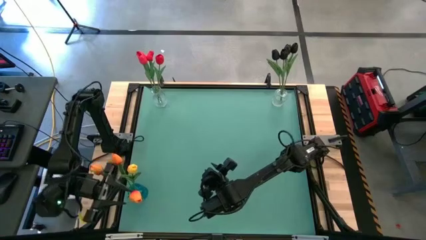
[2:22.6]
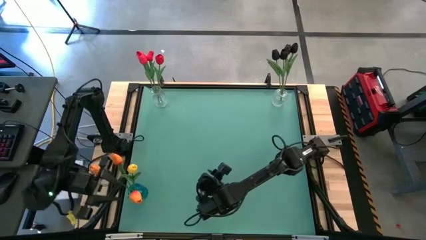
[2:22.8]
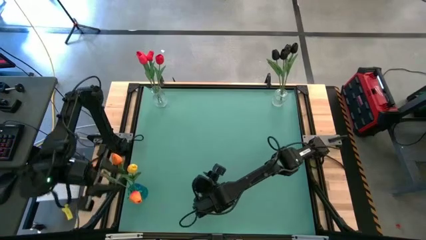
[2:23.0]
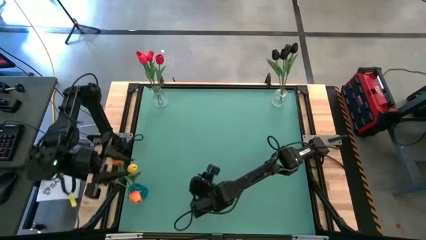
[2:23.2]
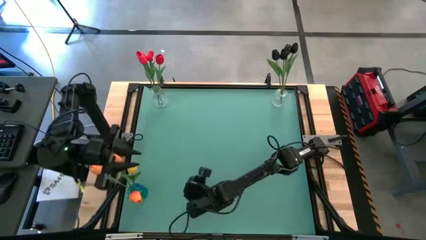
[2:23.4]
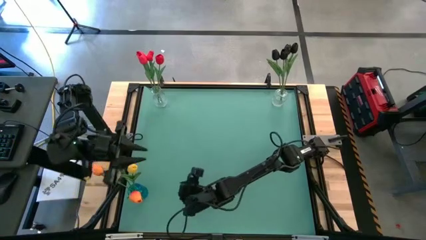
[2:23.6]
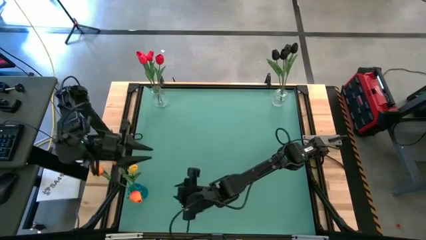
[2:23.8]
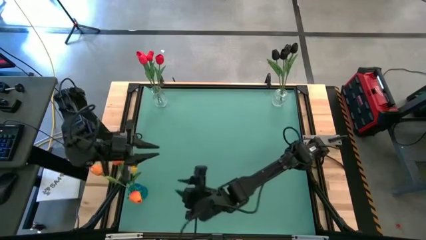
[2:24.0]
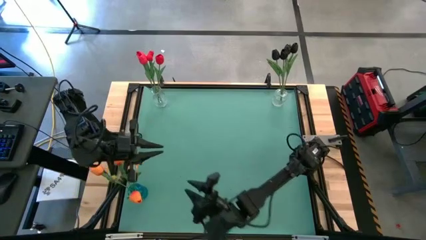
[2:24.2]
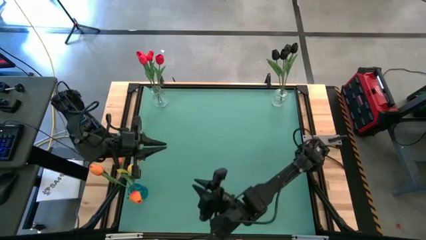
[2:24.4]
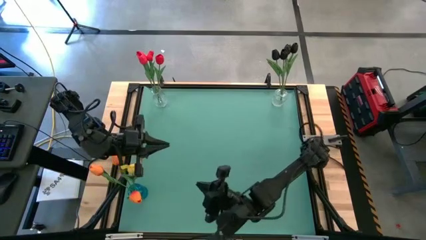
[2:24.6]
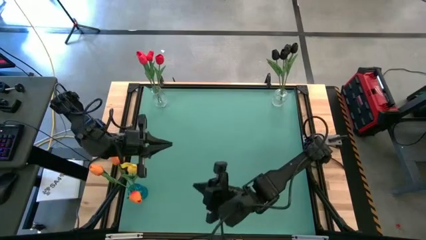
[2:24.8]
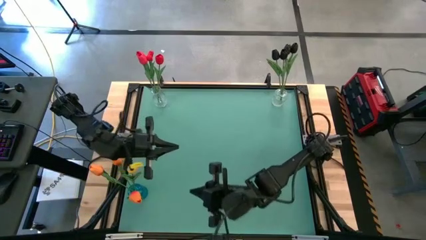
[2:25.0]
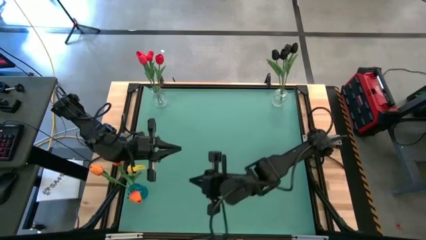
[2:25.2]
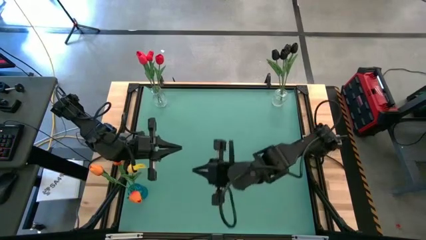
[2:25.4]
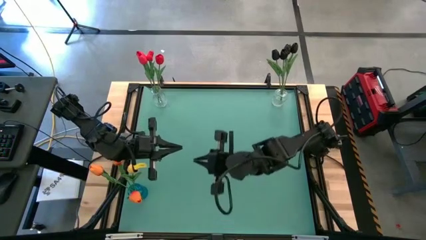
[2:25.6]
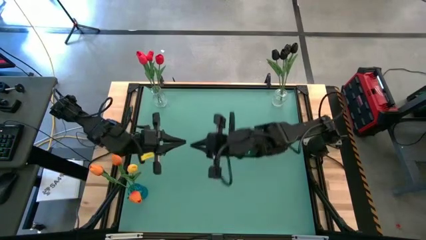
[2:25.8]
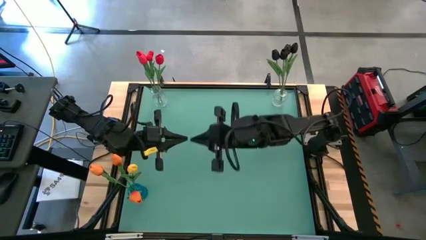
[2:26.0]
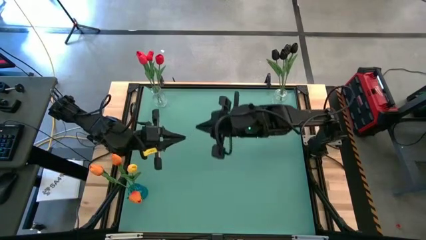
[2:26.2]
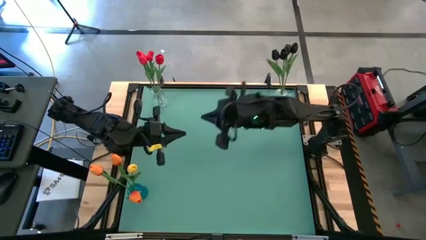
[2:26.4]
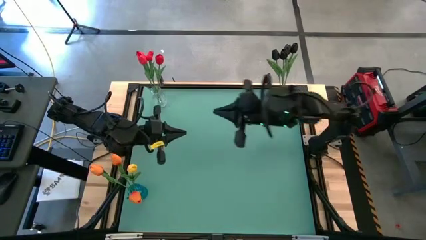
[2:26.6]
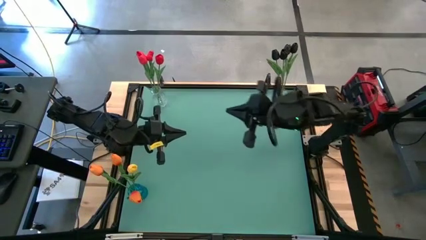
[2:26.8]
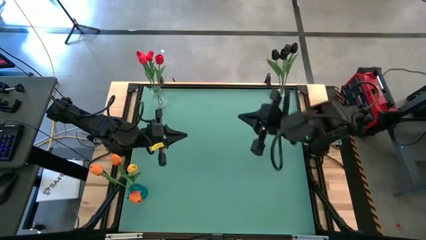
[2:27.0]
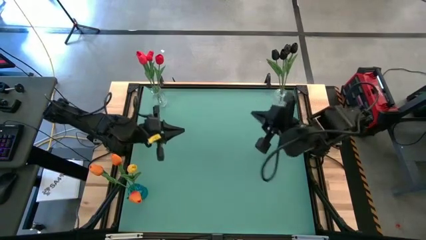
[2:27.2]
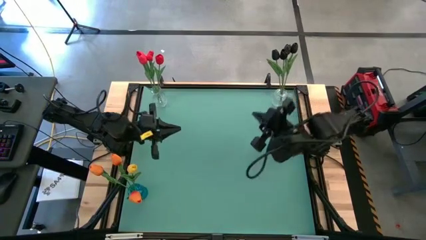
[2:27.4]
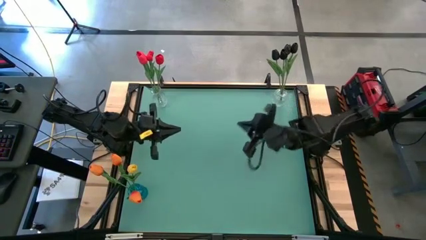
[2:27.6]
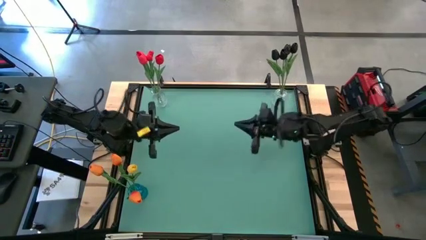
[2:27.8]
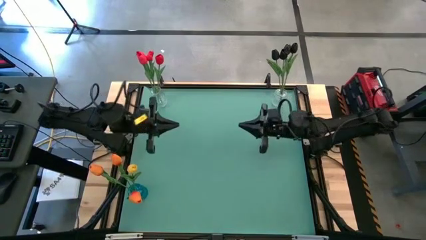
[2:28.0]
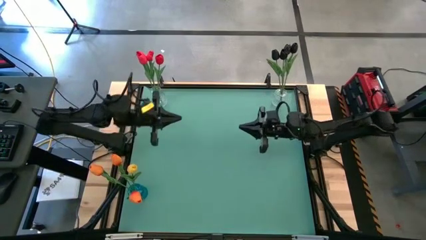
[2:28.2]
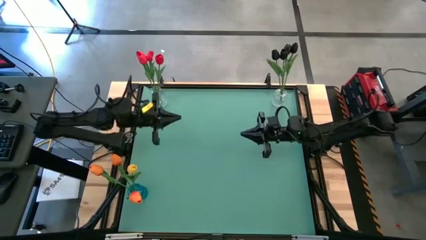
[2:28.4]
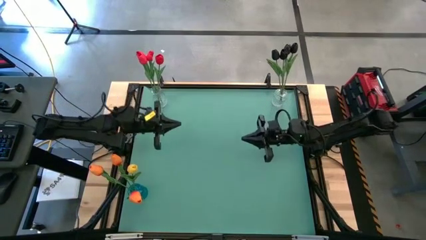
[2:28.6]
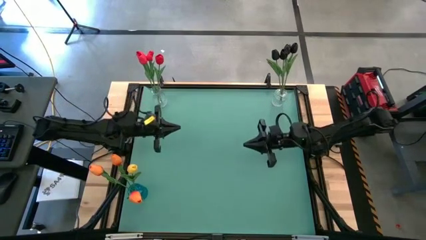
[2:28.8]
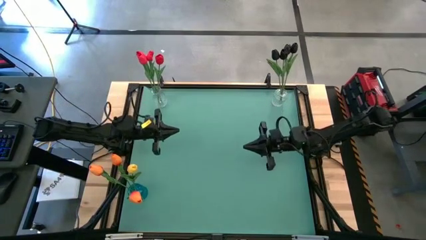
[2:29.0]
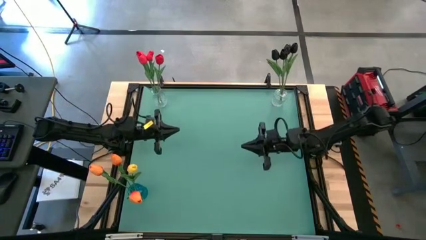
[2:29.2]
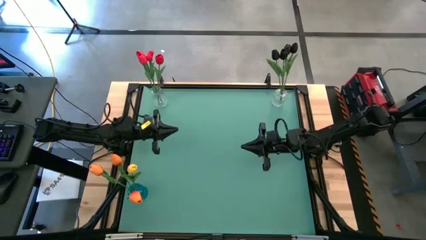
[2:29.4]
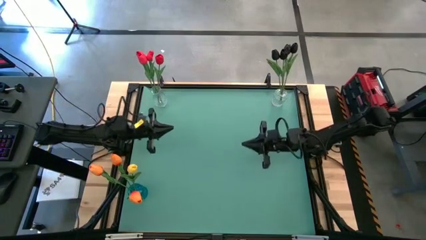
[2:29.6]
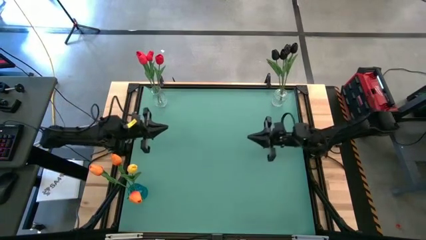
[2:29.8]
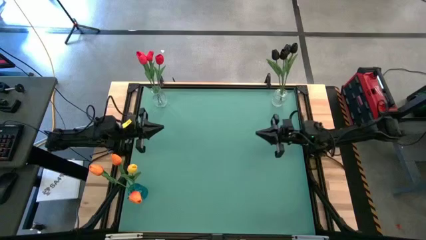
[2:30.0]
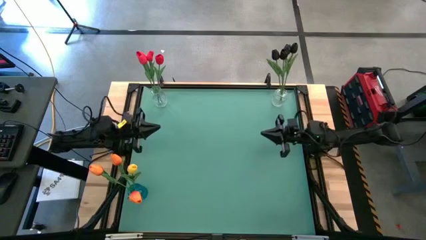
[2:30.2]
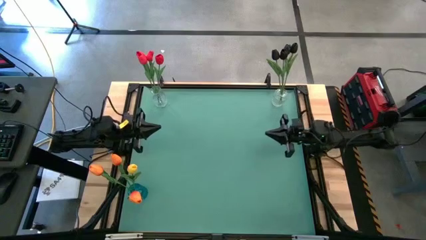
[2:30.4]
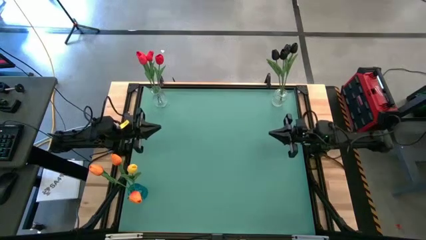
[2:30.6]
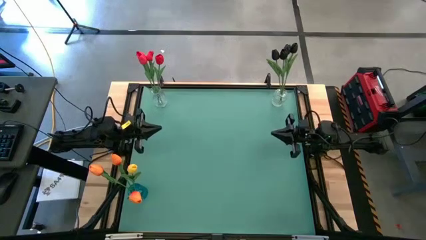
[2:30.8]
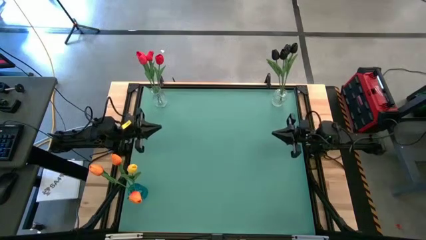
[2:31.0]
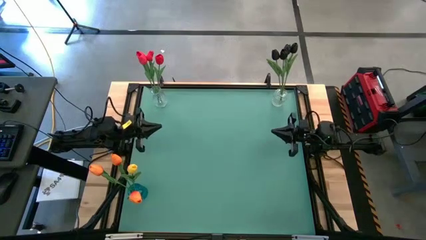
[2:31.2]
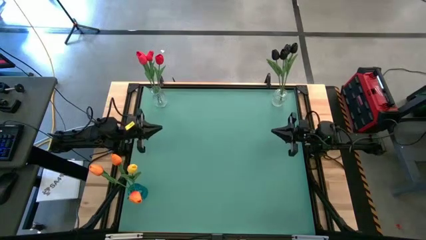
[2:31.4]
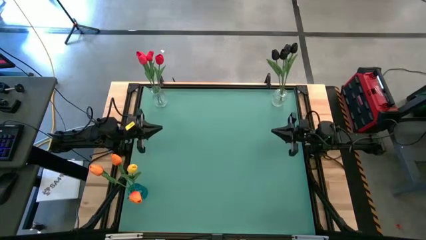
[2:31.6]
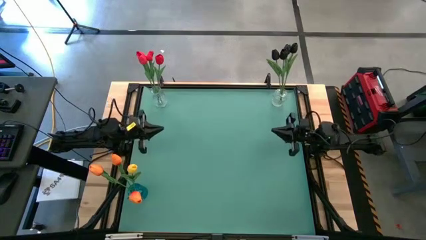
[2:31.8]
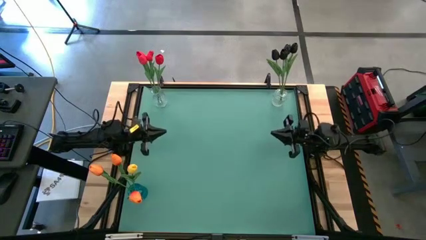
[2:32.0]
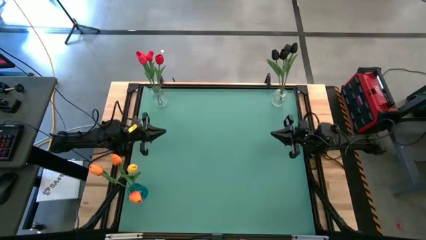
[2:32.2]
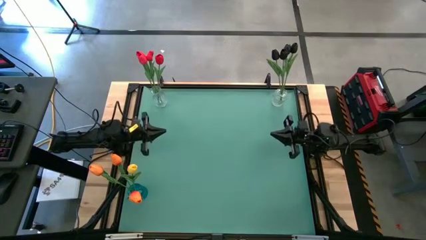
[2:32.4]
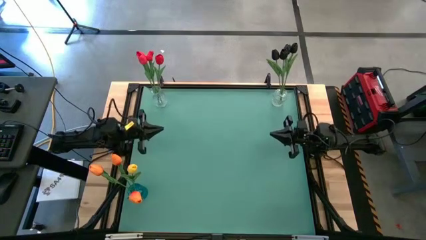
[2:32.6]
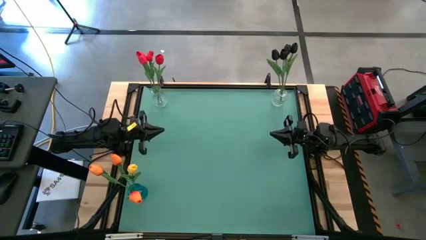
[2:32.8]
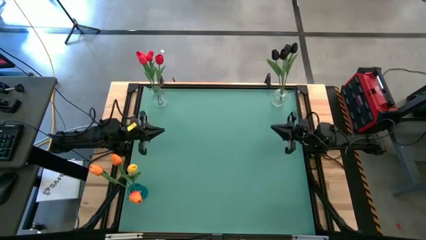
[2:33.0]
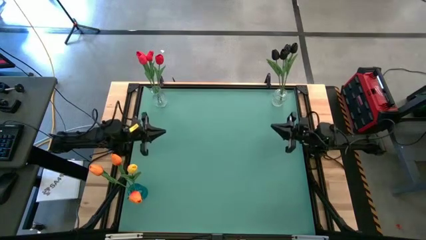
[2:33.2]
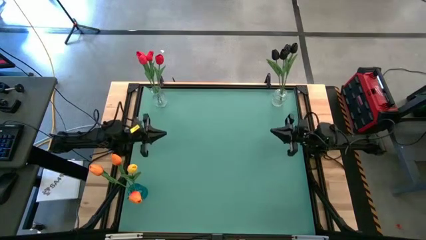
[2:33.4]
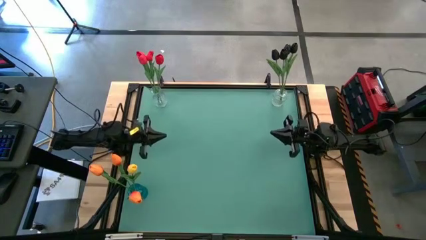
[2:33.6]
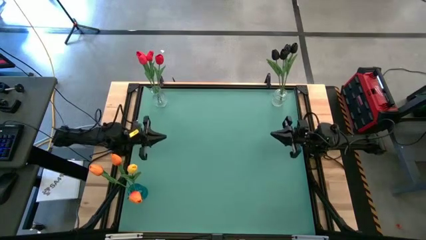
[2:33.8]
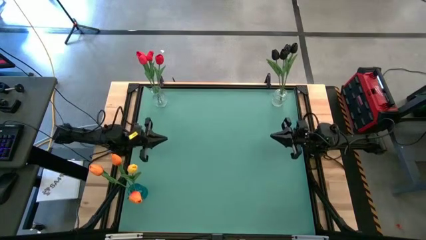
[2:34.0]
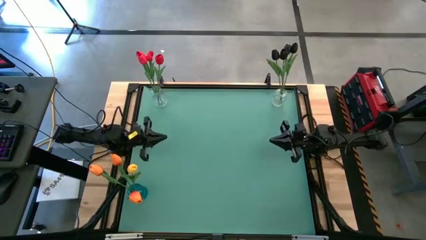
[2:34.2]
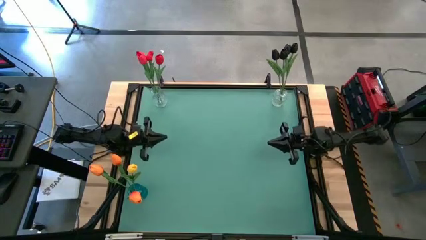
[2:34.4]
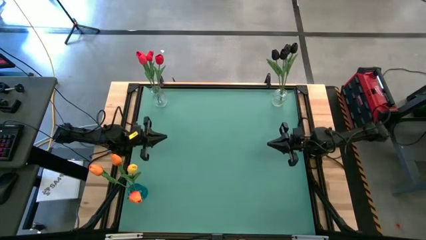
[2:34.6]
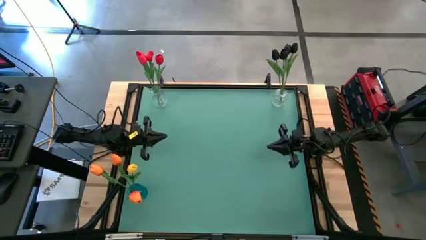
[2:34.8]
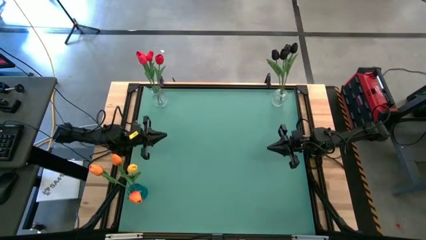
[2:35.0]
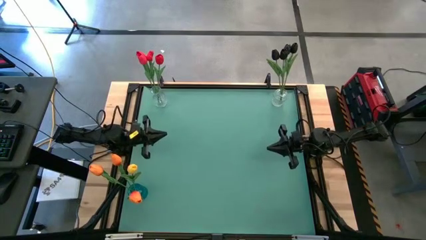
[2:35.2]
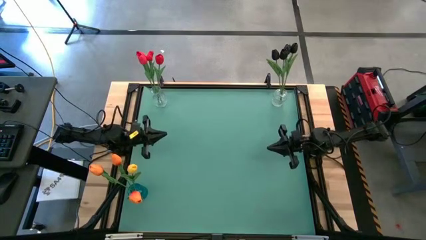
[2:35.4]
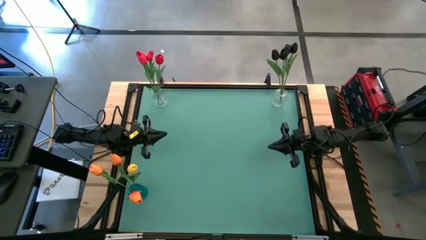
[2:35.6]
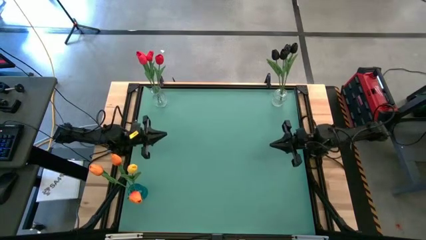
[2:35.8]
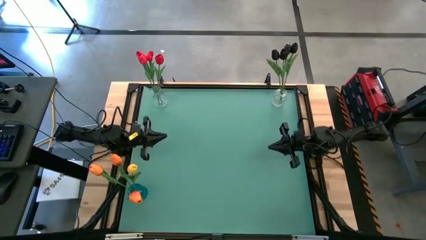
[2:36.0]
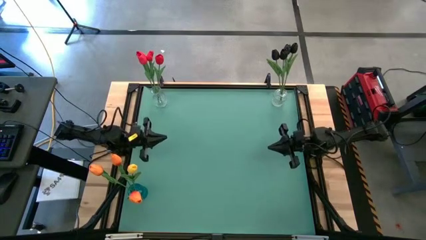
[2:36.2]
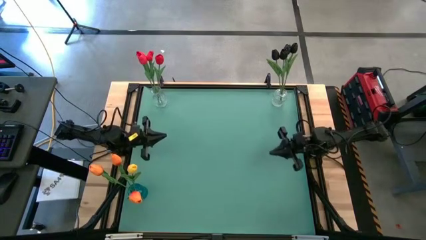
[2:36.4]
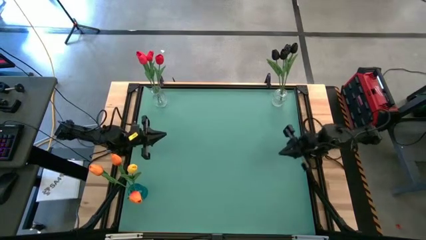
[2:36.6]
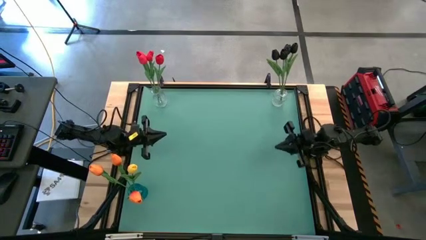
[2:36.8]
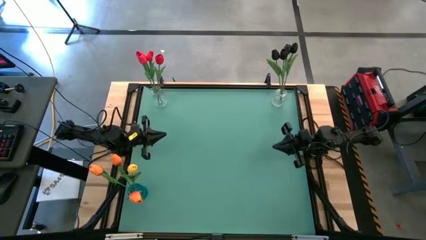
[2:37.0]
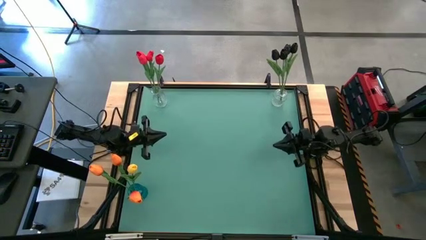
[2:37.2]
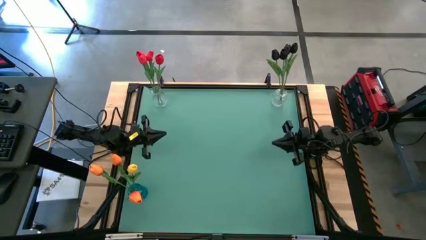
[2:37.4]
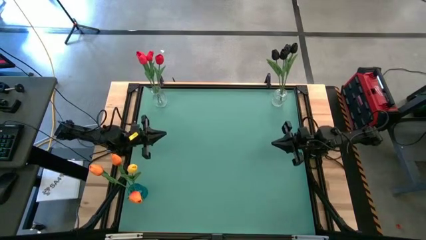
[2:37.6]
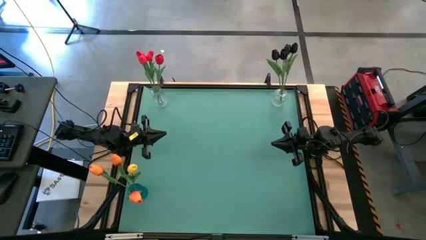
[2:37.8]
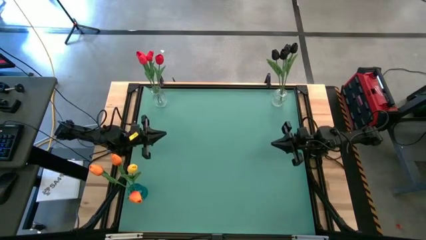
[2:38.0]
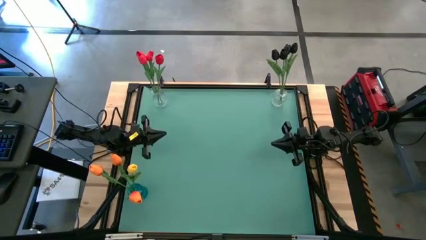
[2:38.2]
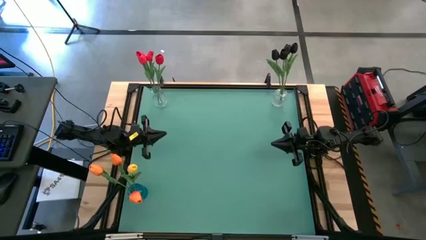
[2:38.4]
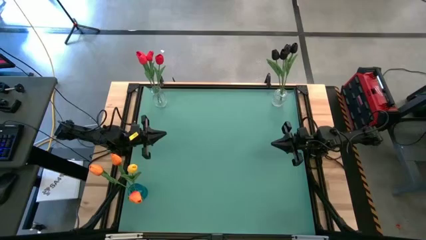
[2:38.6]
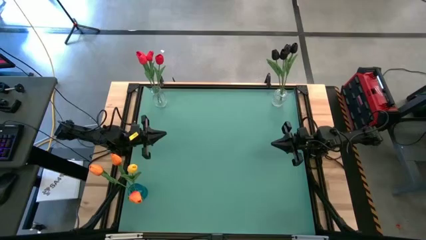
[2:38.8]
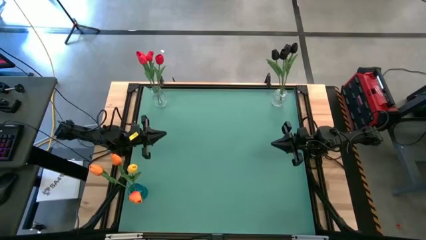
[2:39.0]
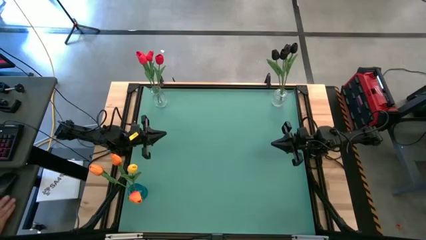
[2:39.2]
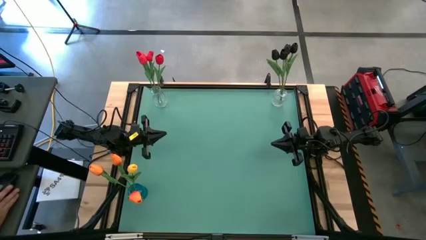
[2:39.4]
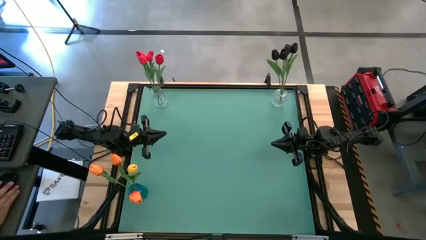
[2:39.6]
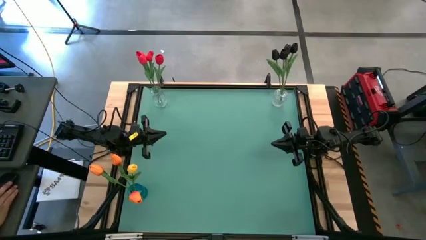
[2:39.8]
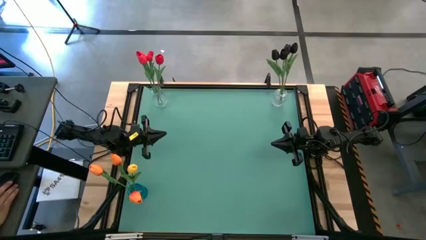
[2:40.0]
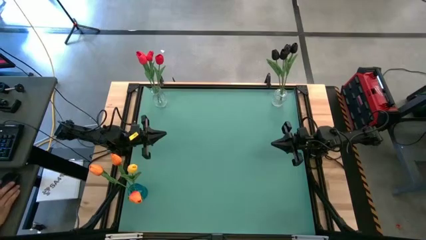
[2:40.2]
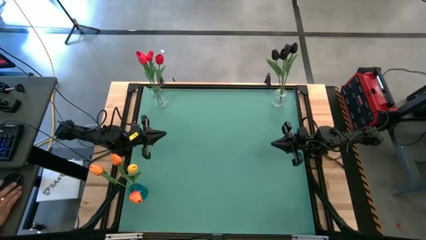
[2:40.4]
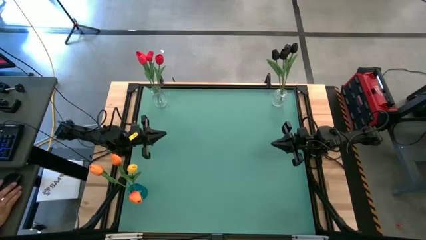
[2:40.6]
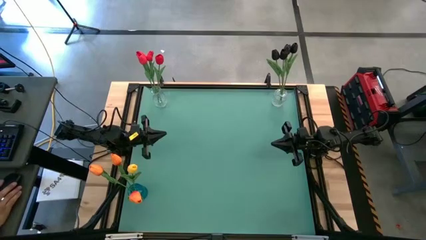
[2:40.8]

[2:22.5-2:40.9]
Task: Sort flowers into vase by color
Return to Home Position
